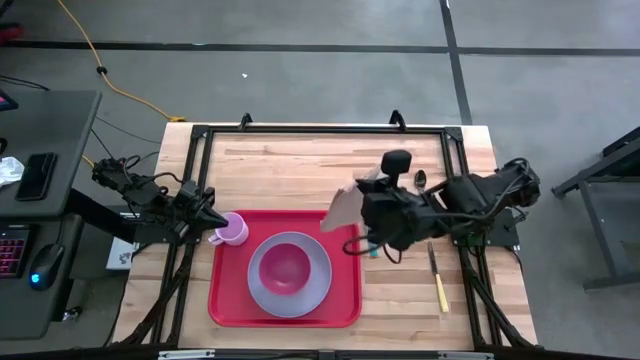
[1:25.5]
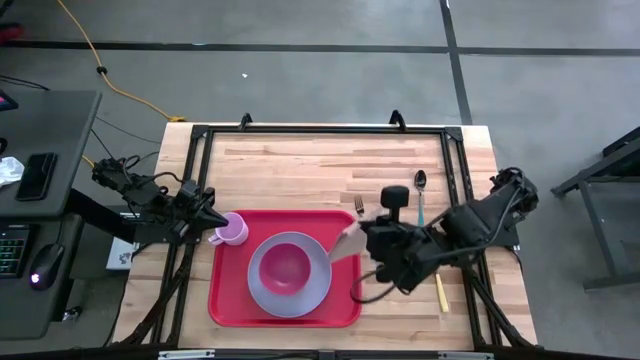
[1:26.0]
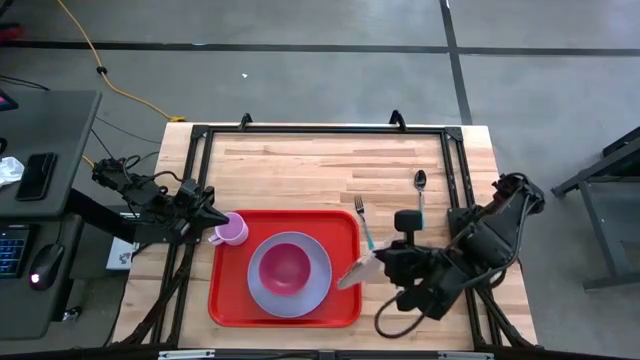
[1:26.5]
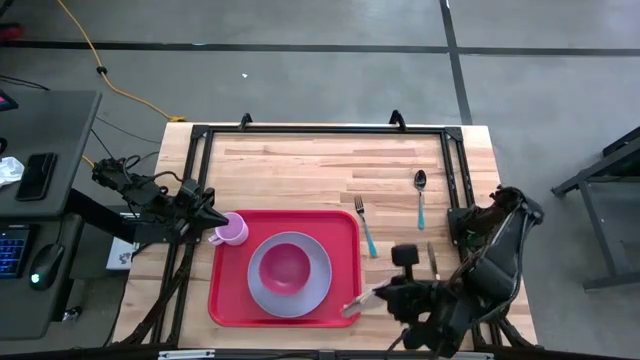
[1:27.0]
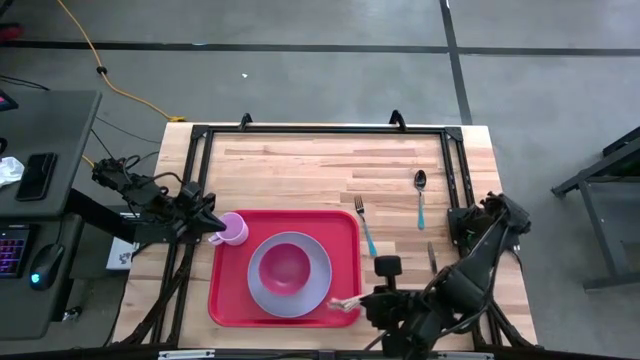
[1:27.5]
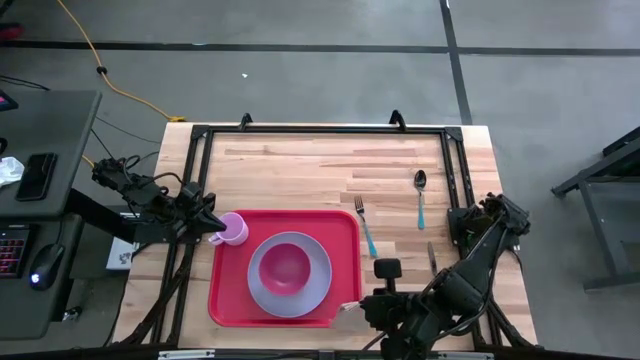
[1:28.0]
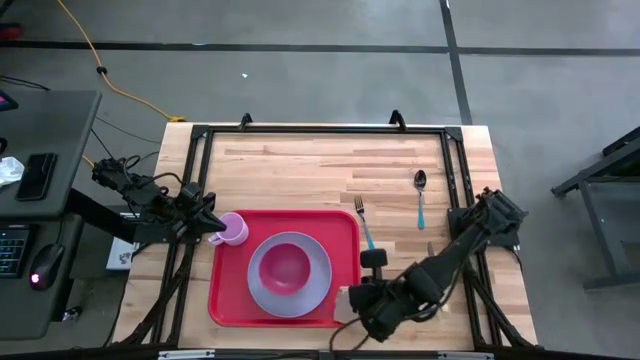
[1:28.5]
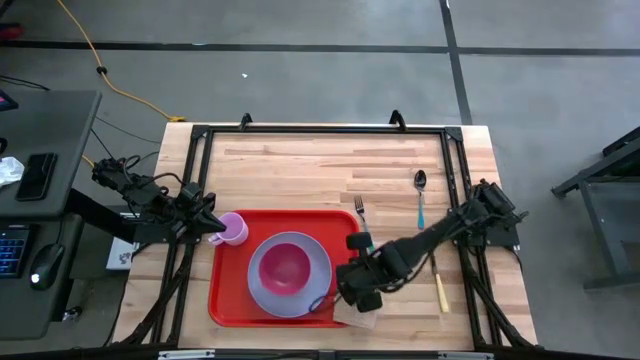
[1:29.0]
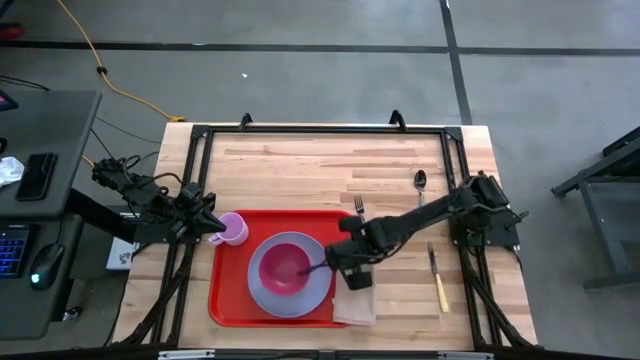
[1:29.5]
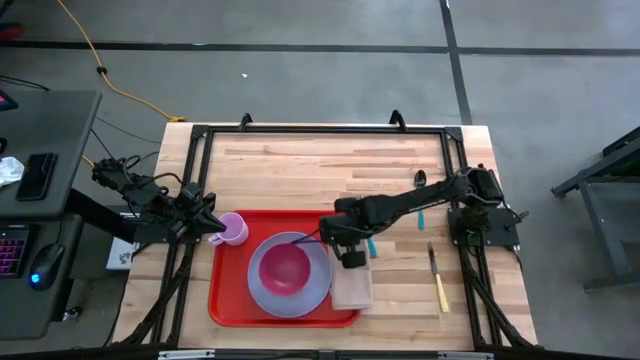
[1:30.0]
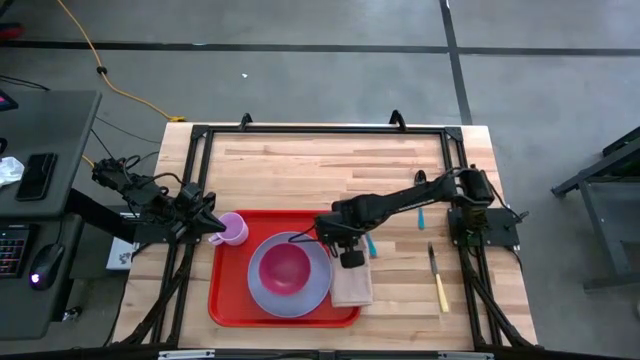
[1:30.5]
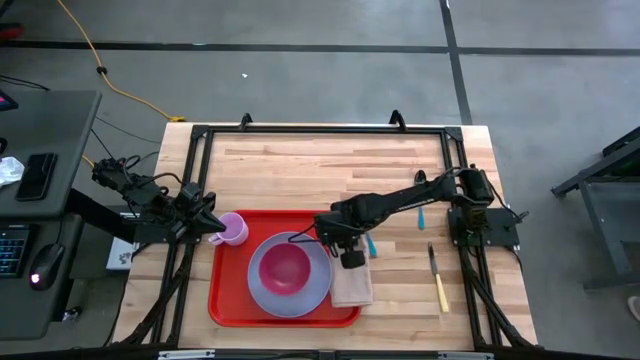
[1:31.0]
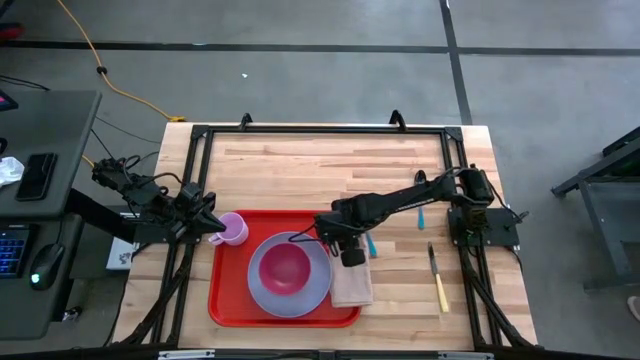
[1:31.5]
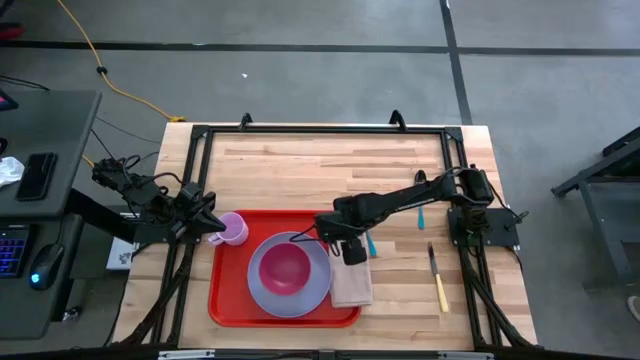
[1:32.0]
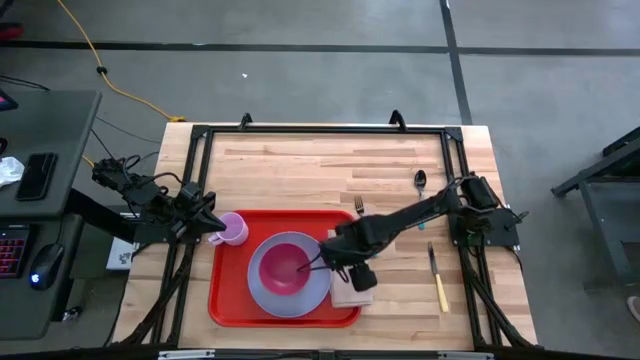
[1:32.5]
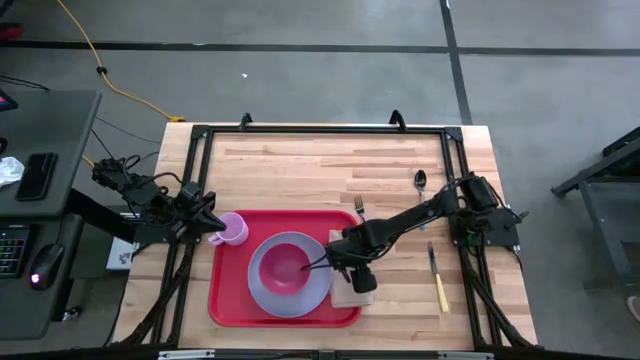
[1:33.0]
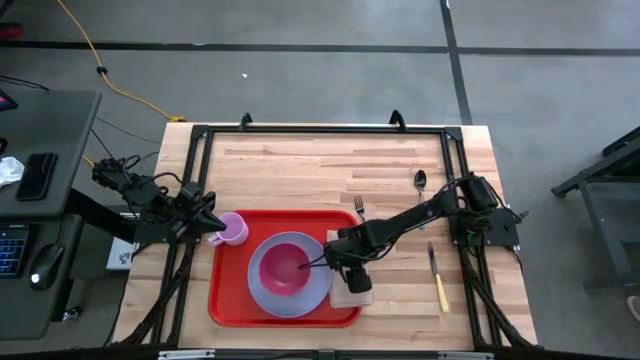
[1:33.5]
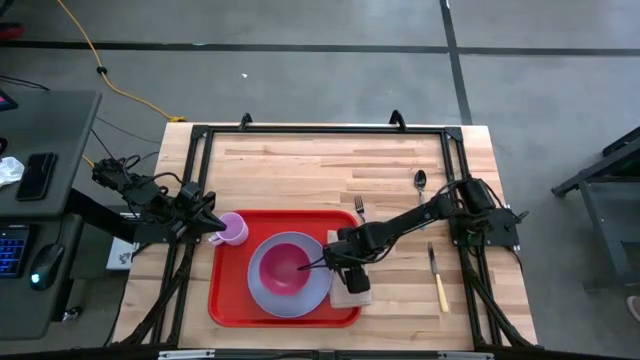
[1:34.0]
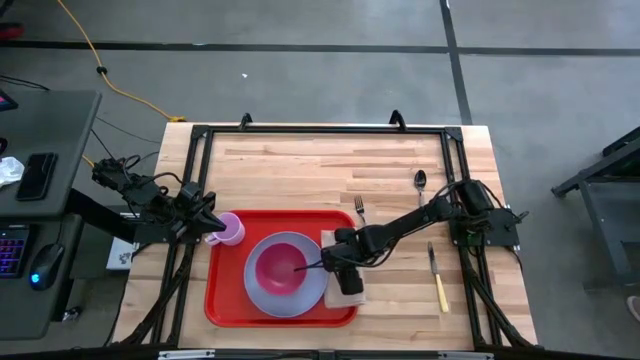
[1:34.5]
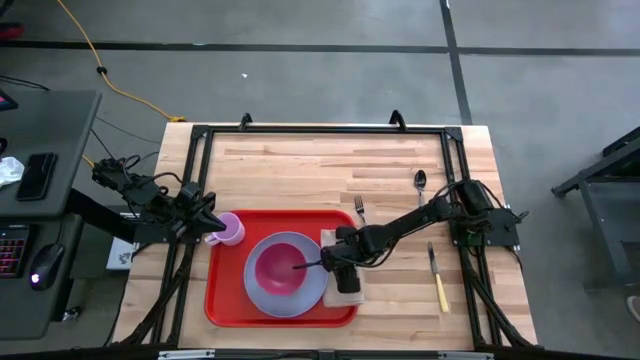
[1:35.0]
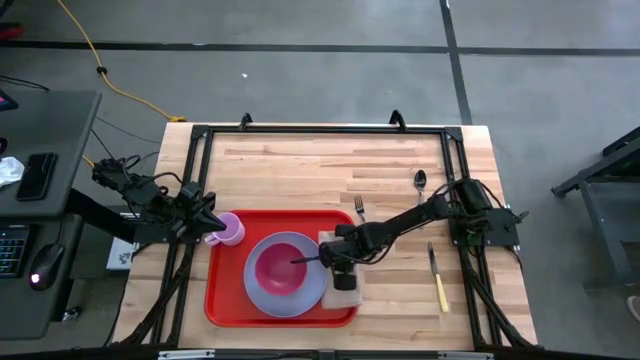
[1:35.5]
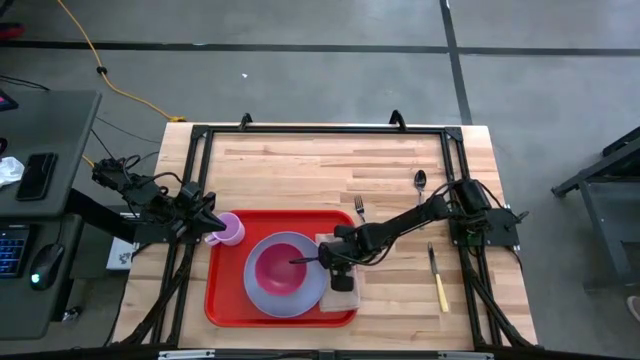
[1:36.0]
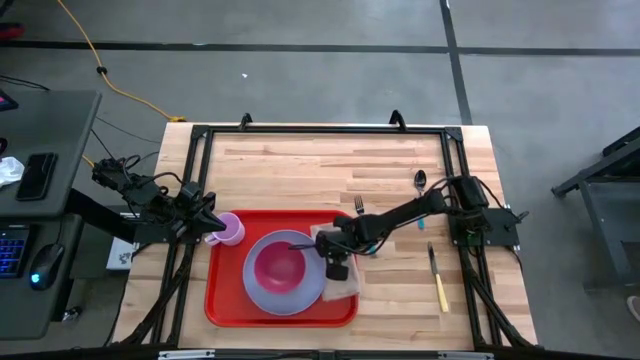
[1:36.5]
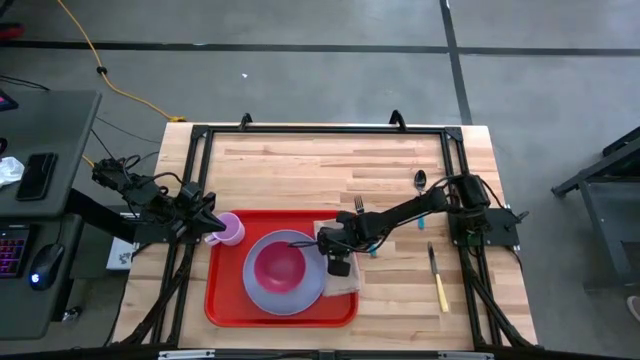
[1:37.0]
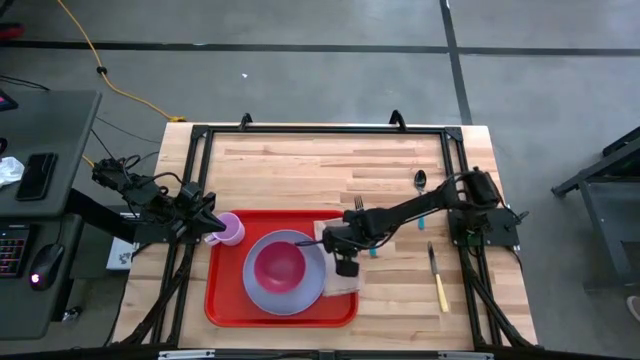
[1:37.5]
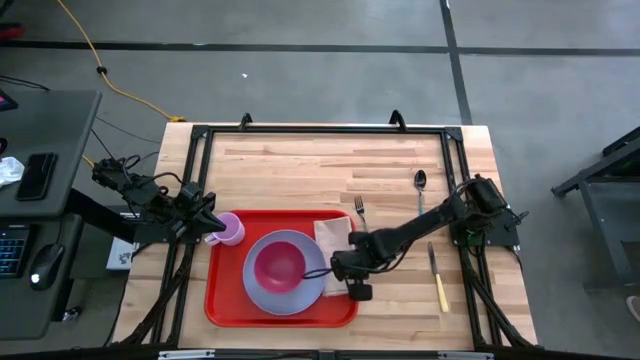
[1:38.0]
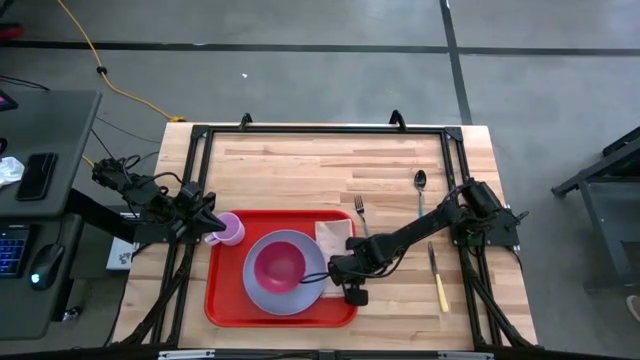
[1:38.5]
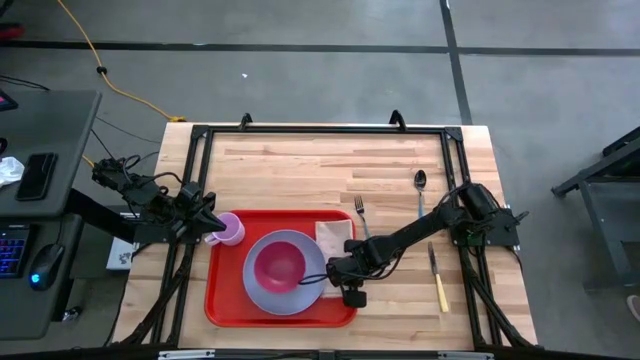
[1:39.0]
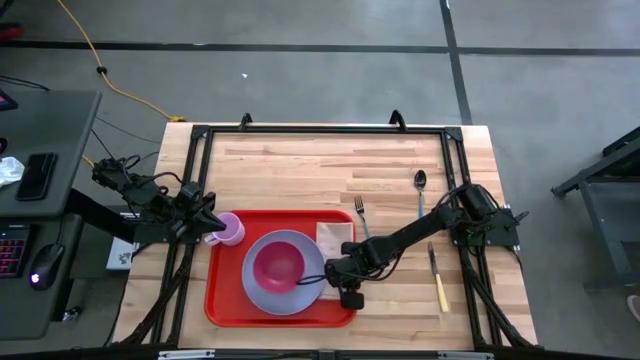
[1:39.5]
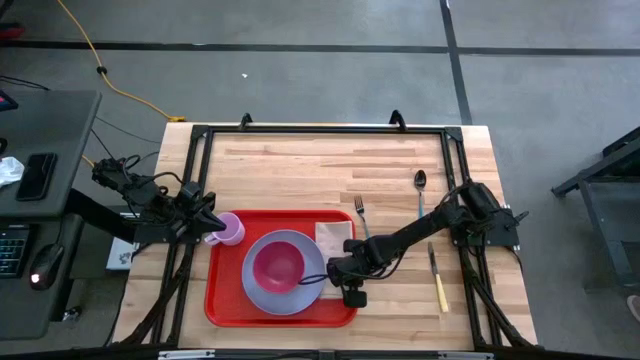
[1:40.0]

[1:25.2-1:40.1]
Task: Set up tray
Put the brown table napkin to the right of the white plate on the red tray

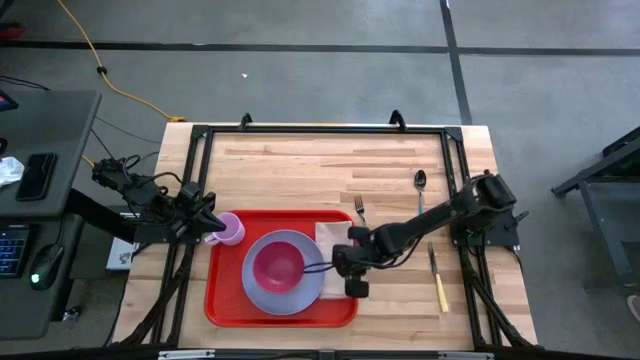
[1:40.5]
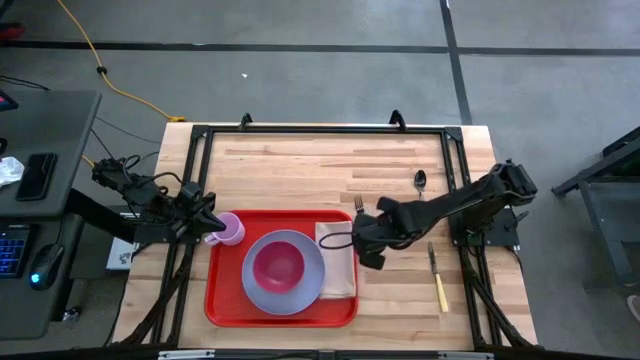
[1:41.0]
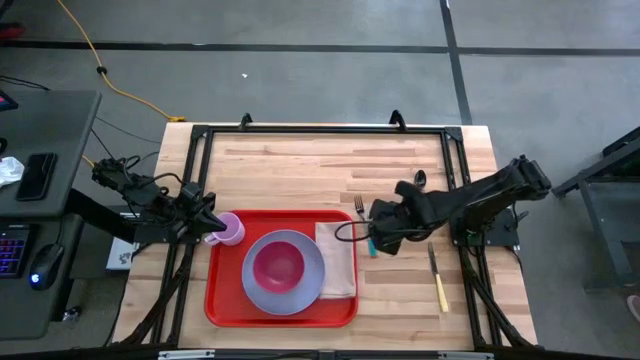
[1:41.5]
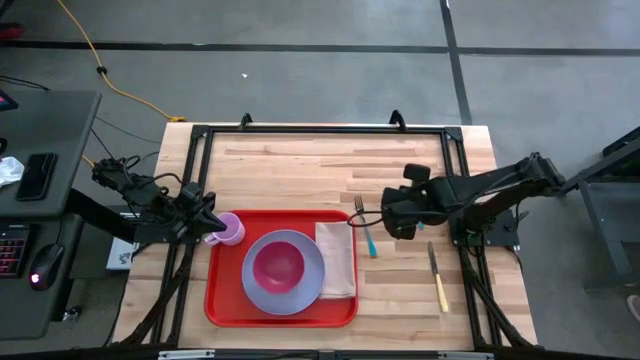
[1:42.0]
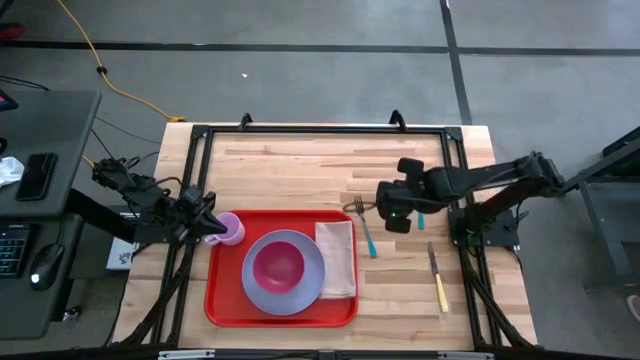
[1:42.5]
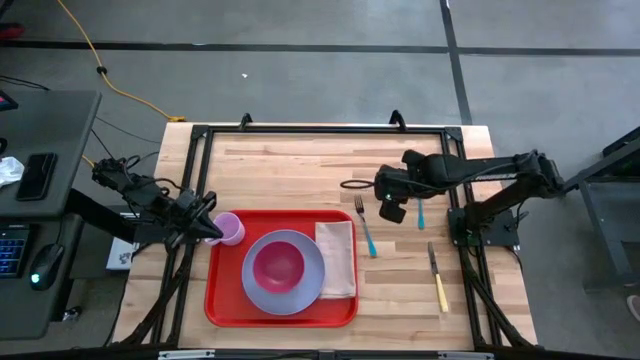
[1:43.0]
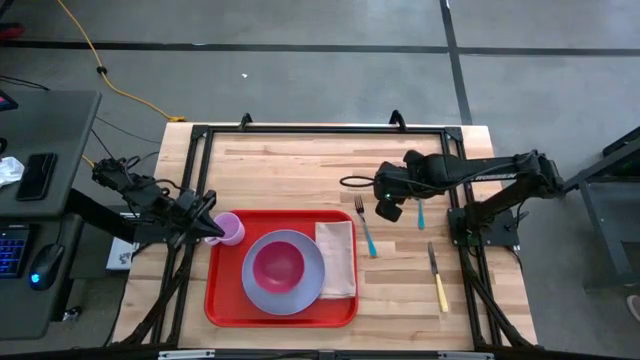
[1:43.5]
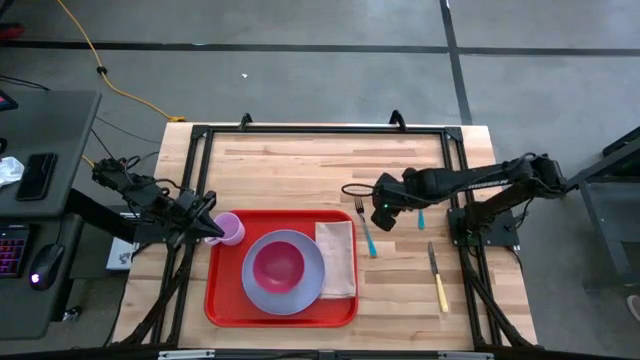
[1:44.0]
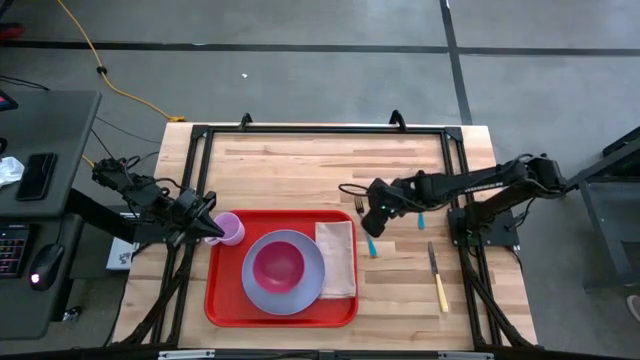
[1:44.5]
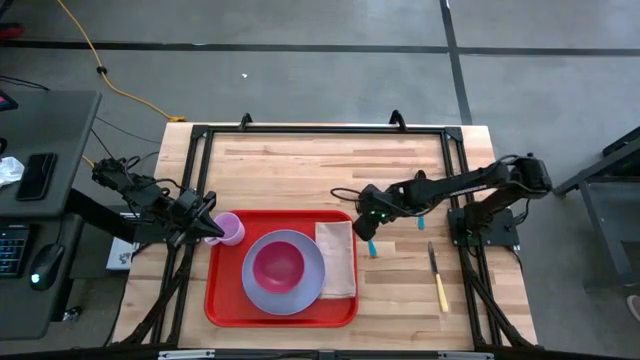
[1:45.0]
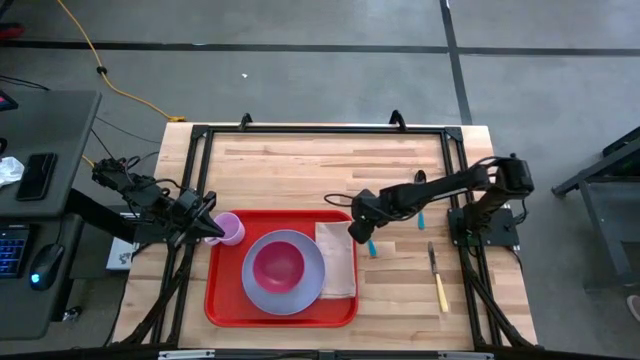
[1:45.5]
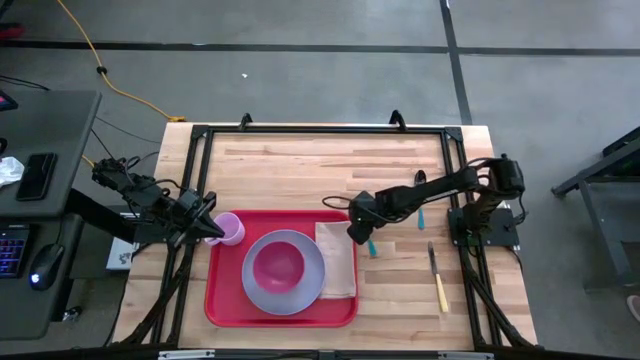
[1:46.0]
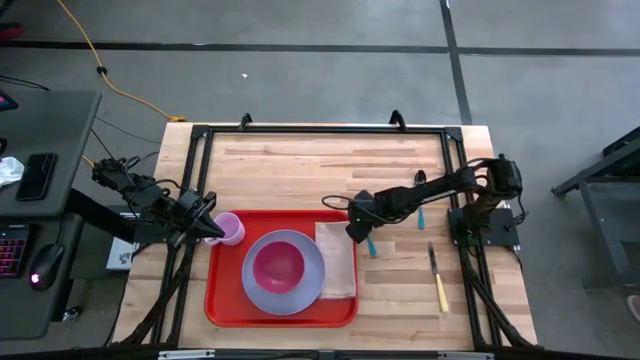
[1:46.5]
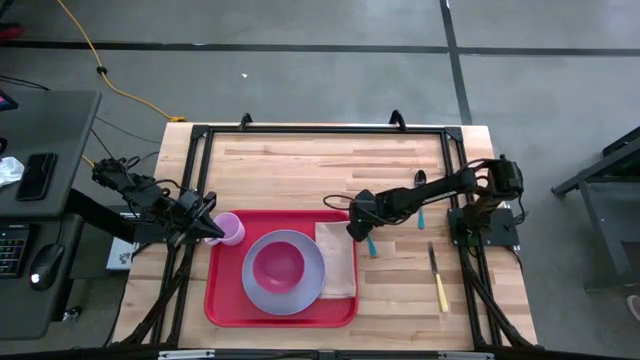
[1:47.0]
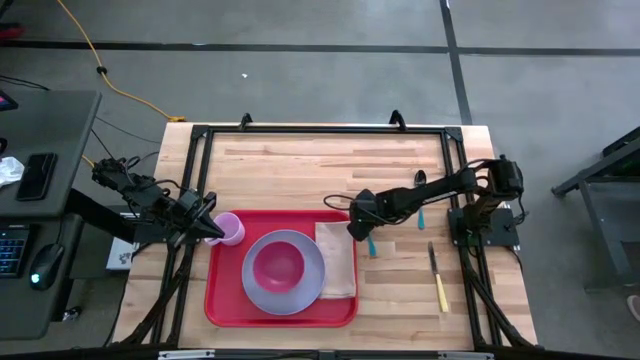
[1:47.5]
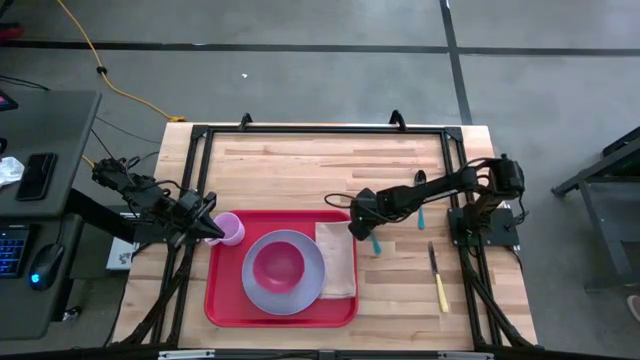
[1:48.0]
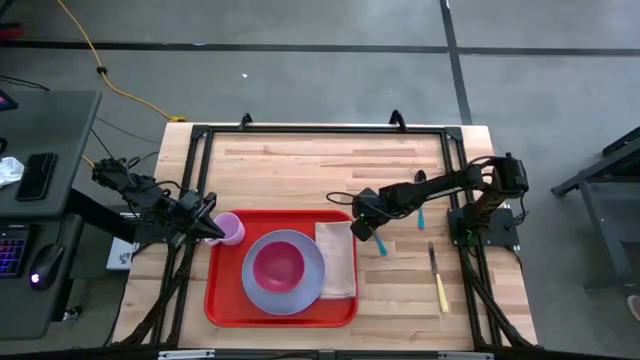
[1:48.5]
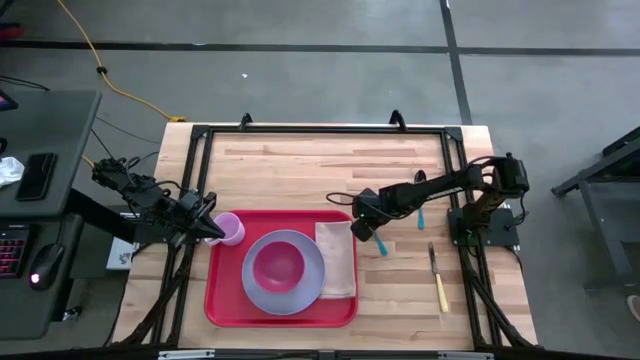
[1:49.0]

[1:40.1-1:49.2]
Put the blue fork on top of the brown table napkin on the red tray
